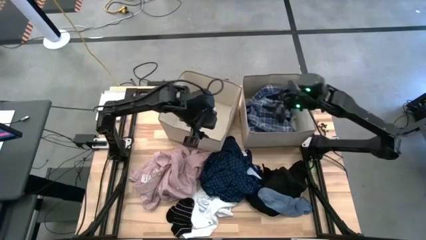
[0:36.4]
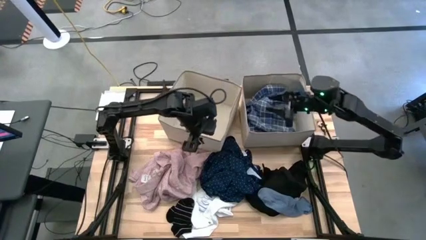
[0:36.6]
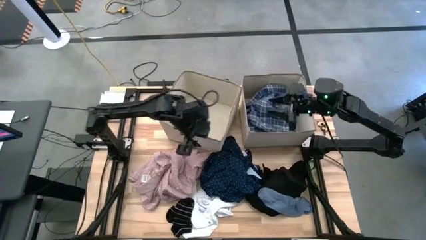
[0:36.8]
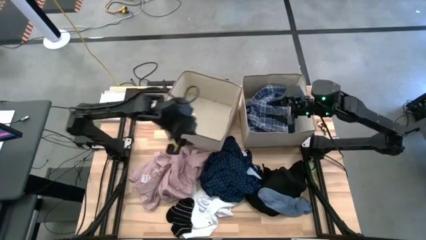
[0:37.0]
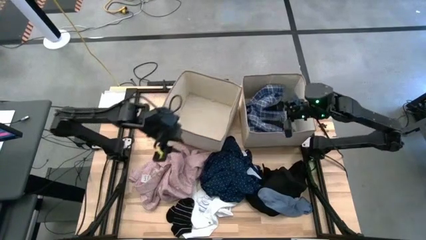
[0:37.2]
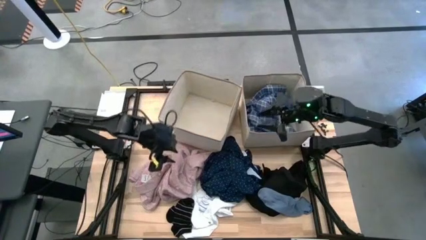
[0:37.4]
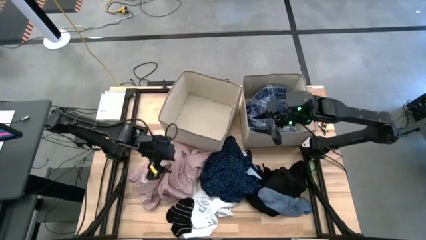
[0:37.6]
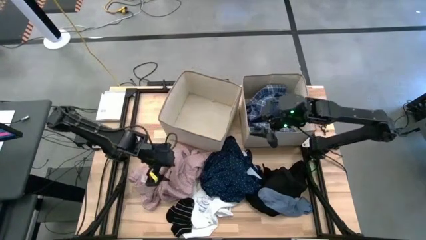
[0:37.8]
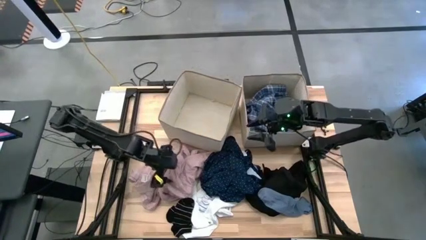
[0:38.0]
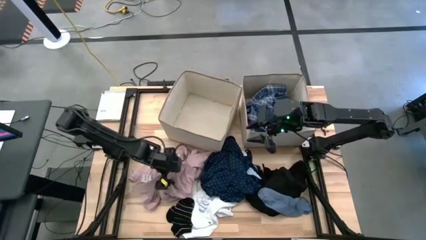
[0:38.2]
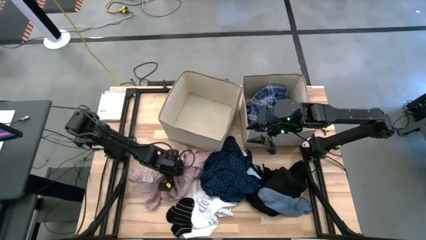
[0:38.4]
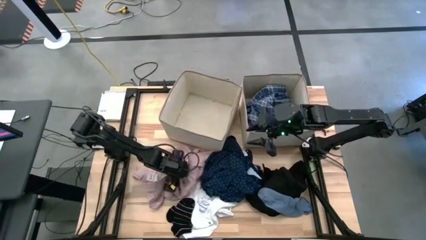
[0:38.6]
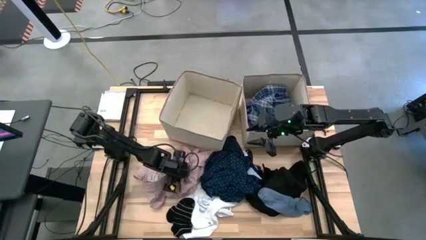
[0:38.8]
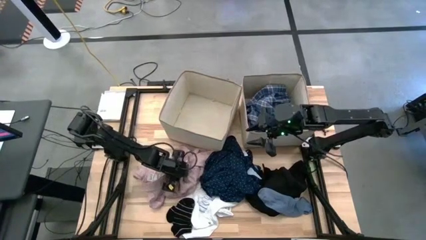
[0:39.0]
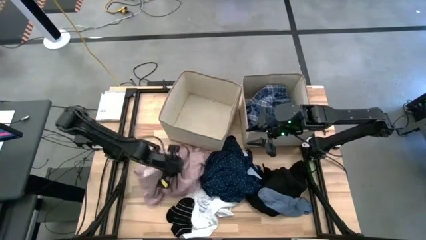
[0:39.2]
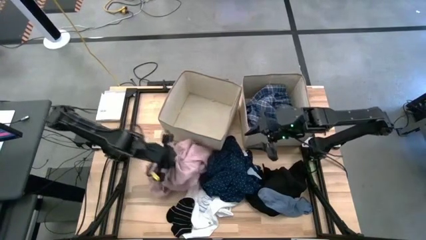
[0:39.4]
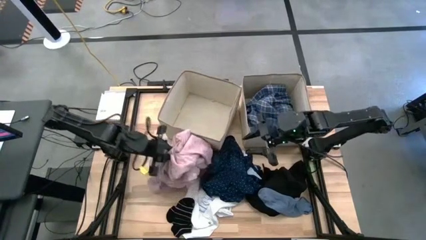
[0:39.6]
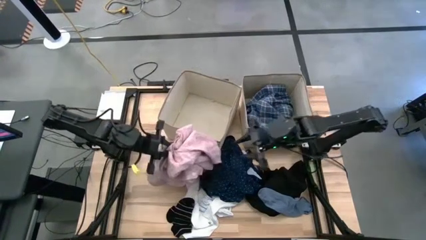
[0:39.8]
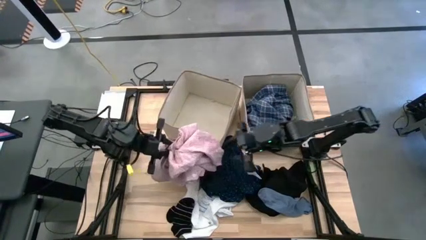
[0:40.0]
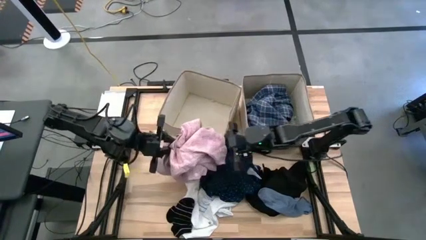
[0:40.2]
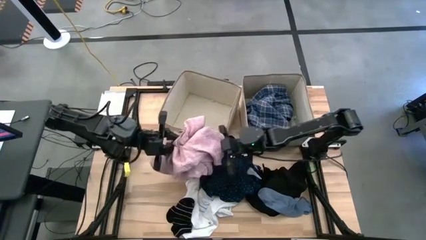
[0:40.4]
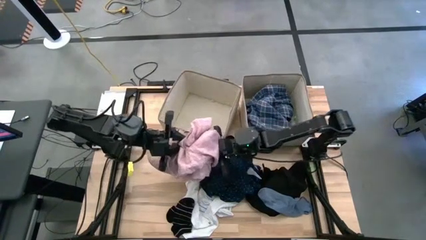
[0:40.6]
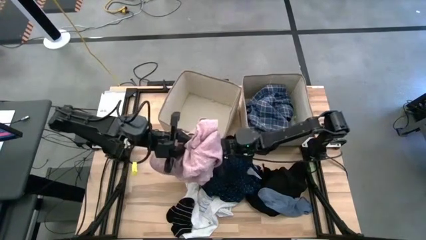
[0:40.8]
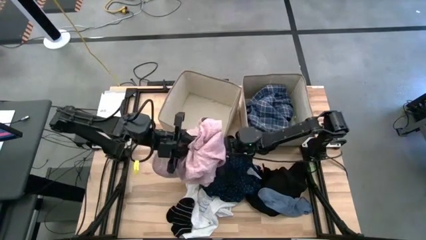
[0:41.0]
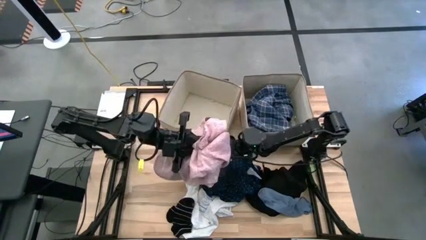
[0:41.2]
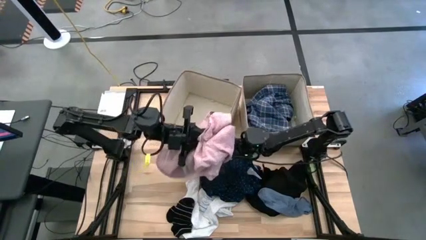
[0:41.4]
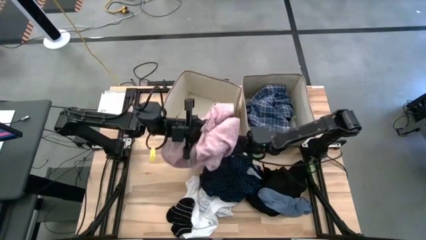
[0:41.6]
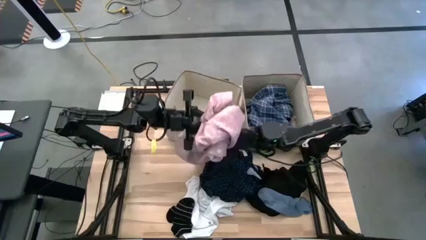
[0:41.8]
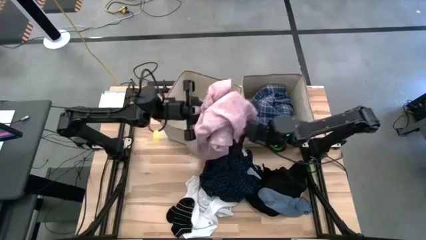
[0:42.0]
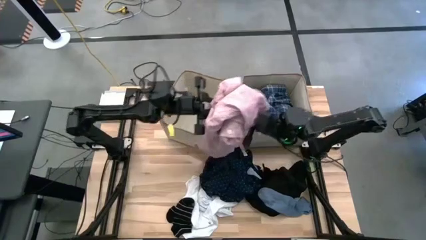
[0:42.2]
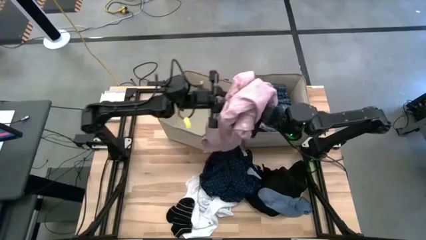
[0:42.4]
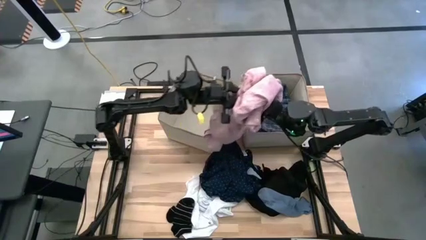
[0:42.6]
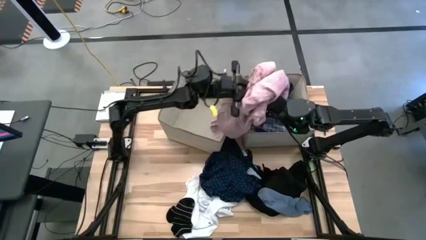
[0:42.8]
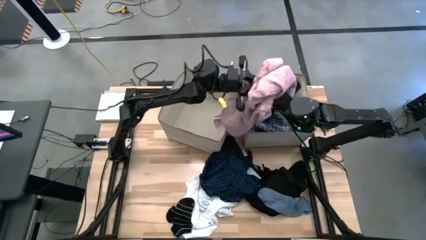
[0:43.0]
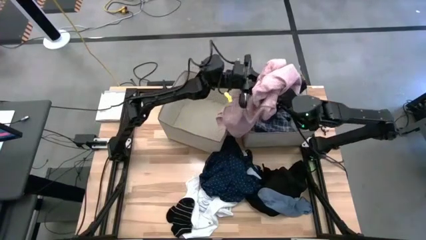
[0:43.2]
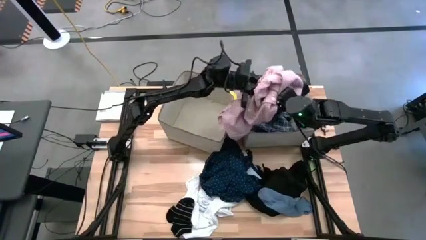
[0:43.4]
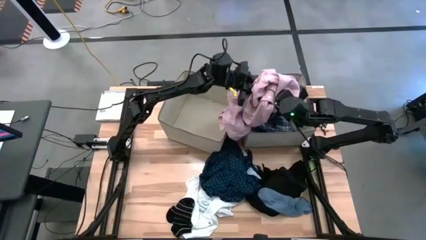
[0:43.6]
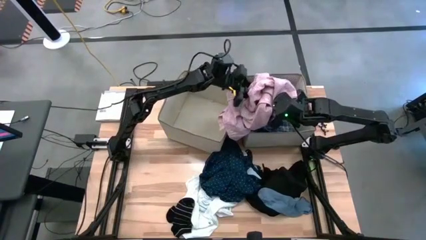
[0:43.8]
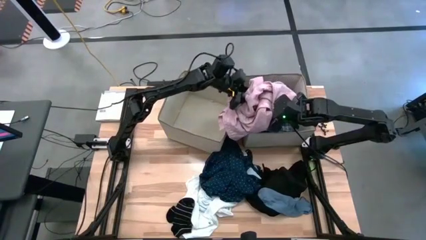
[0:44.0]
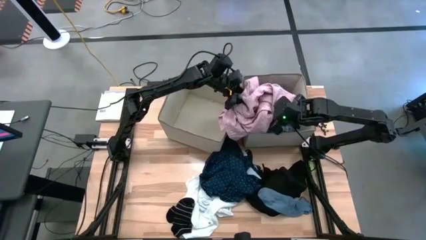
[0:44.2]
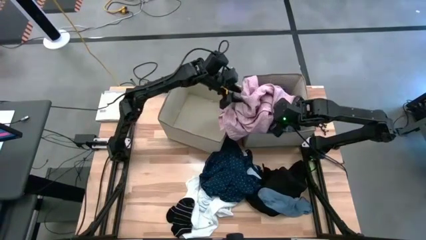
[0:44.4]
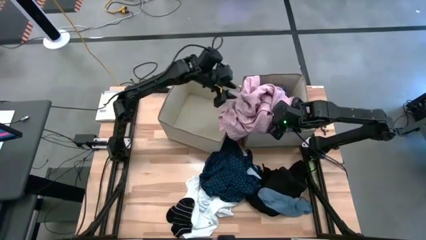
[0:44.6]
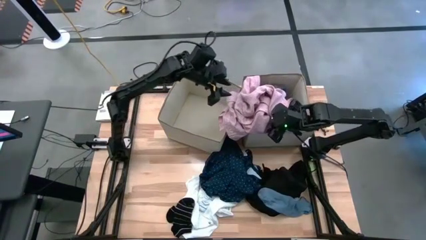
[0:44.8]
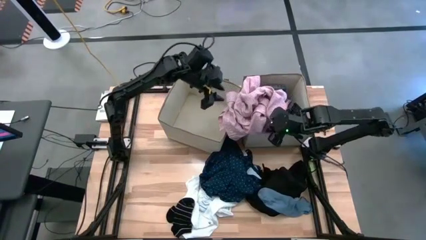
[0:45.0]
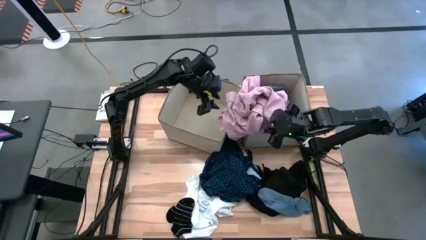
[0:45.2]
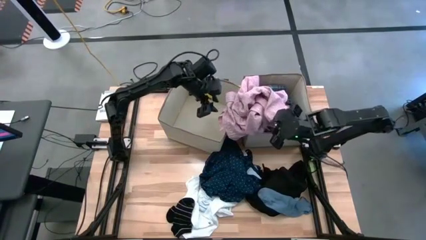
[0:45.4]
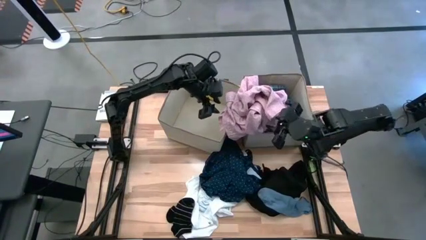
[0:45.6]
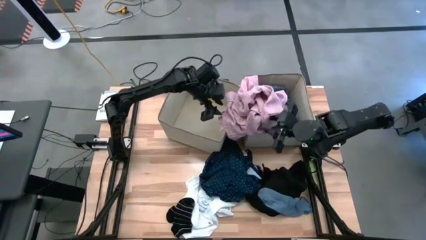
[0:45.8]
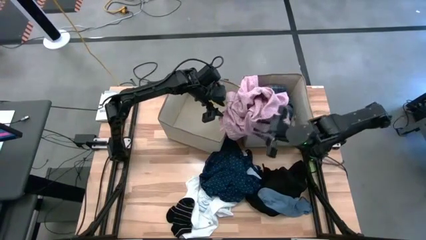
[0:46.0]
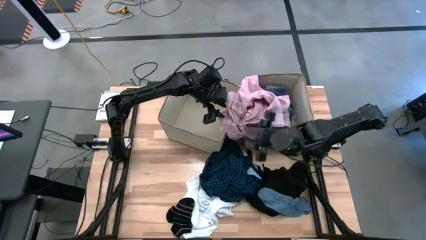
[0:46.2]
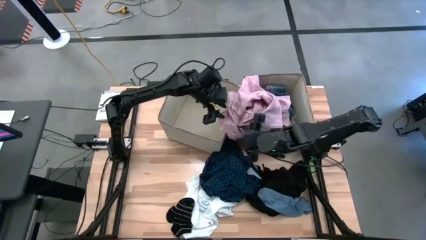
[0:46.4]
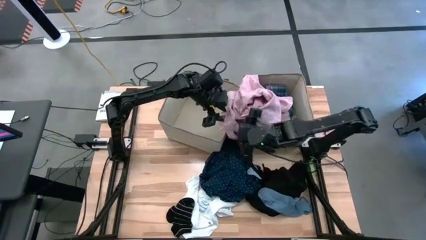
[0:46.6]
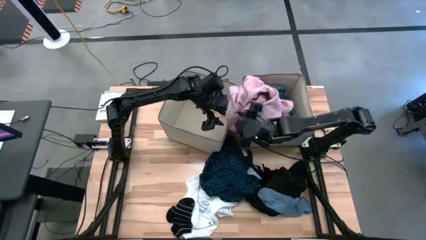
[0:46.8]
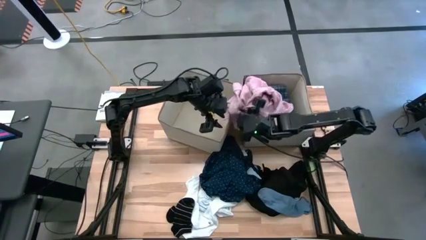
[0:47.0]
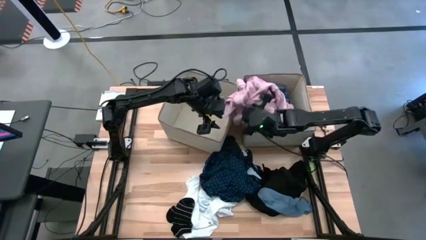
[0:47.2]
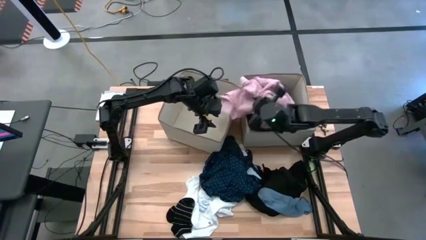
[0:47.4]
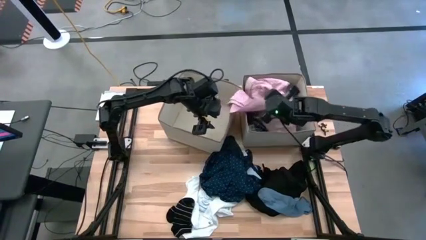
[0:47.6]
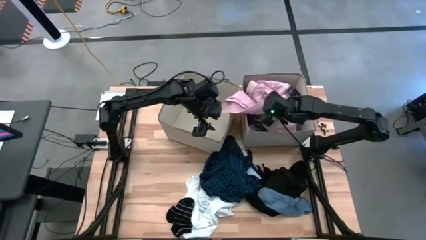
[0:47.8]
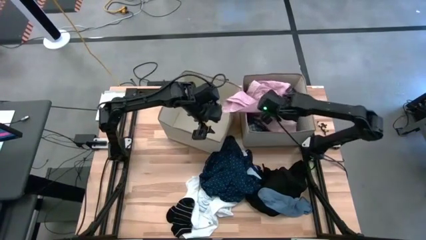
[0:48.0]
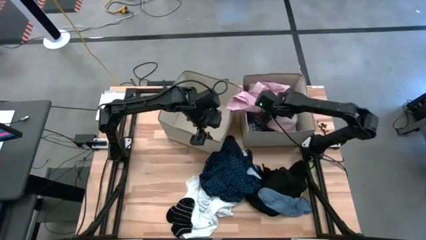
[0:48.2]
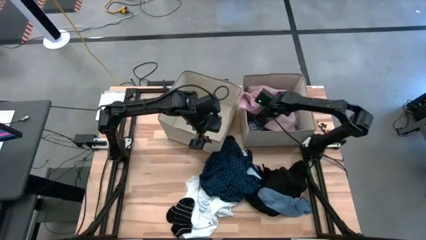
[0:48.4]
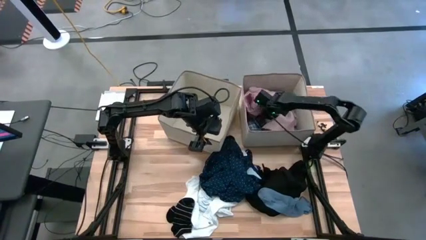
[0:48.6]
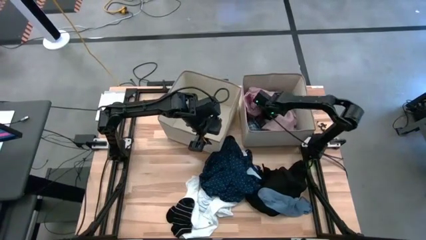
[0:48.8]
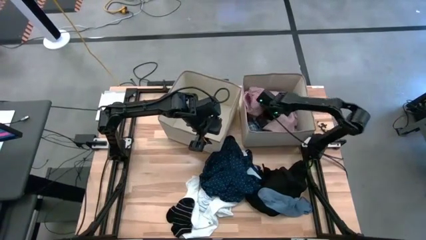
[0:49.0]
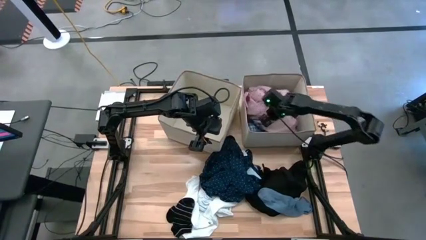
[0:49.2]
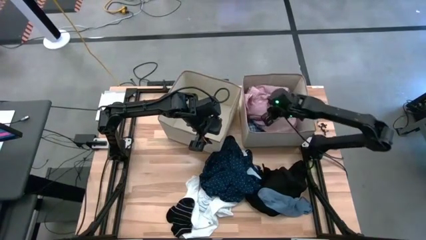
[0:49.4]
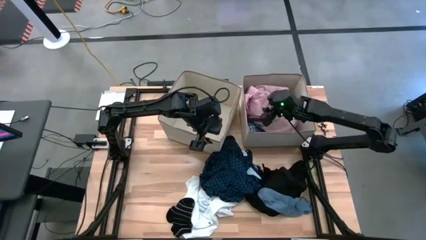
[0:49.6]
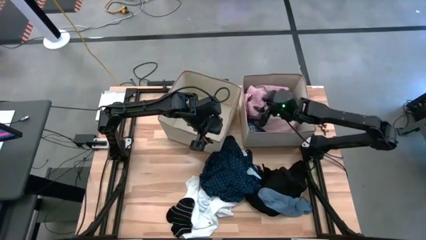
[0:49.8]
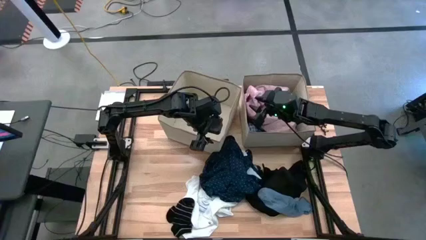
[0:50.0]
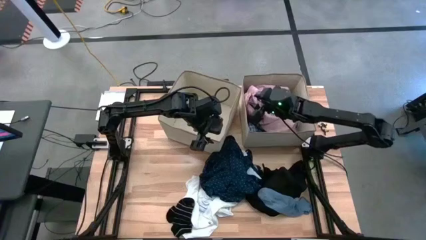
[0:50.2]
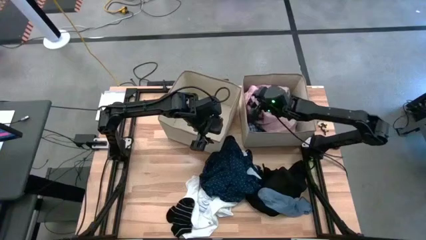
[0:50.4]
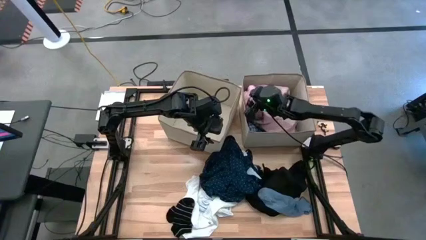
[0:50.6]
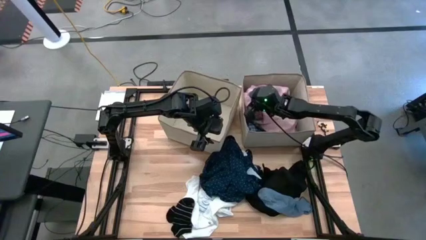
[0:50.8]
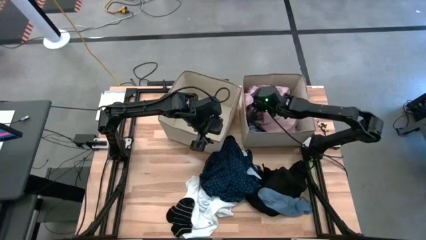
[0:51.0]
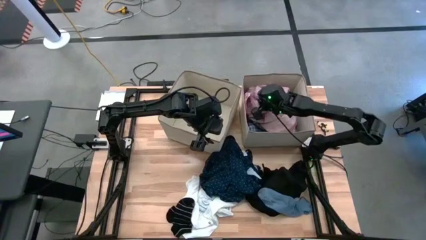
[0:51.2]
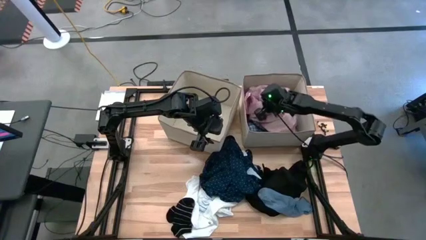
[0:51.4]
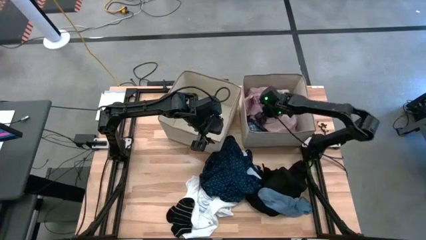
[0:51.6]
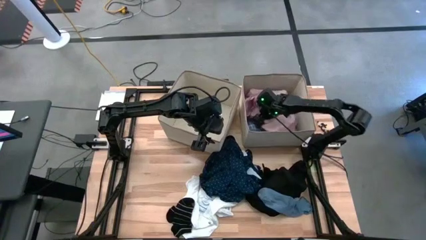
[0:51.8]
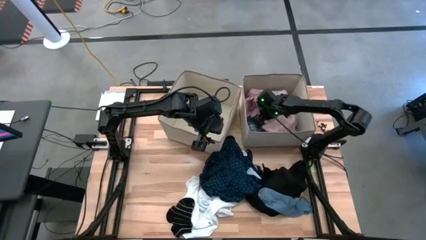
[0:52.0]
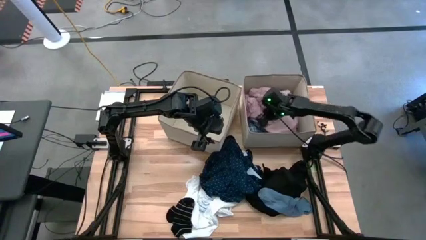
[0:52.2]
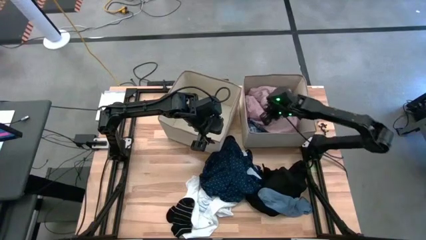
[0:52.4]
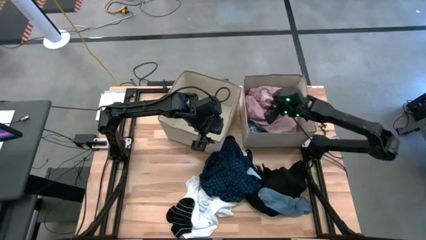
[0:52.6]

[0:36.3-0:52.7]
Task: Sort clothes
Put the pink long sleeve shirt into the right laundry organizer
